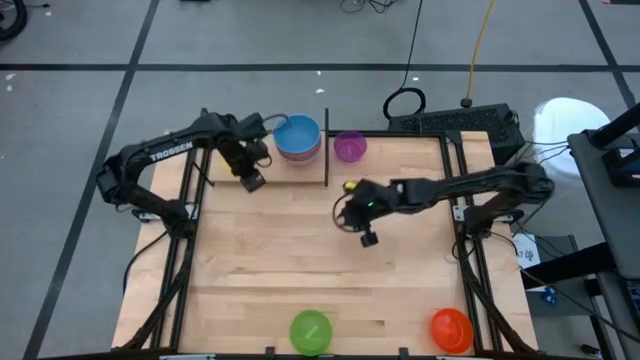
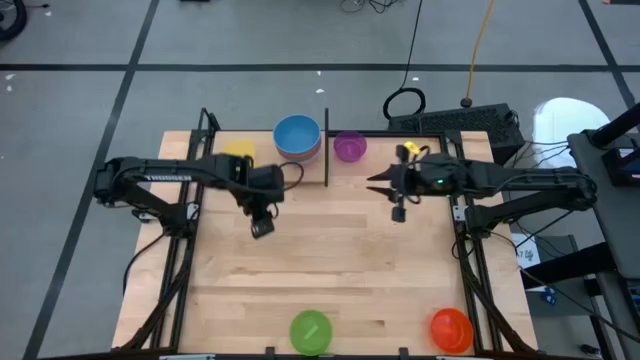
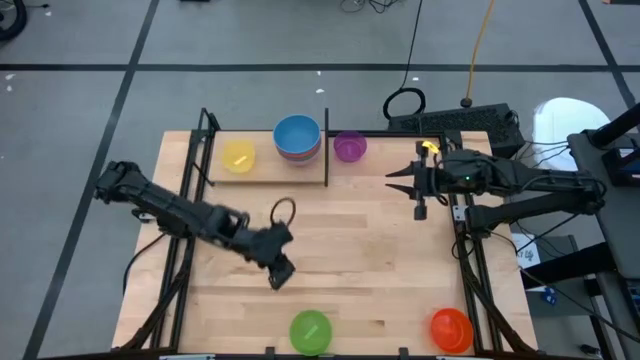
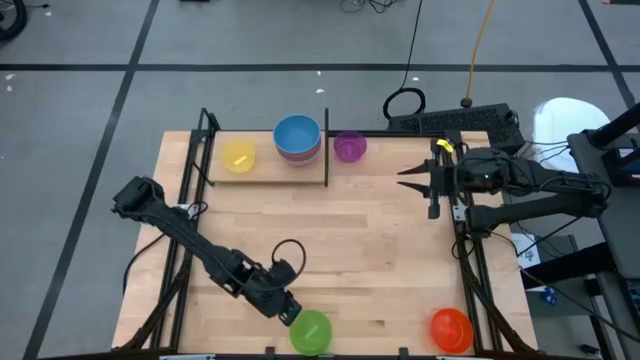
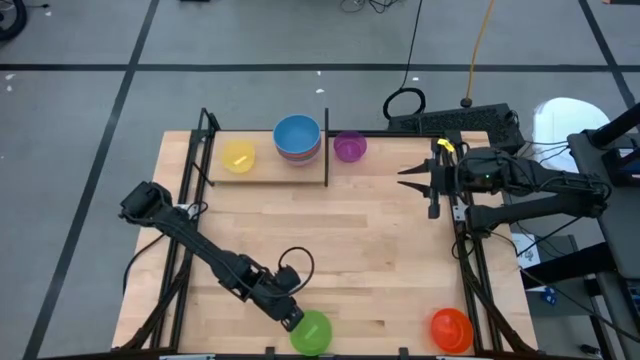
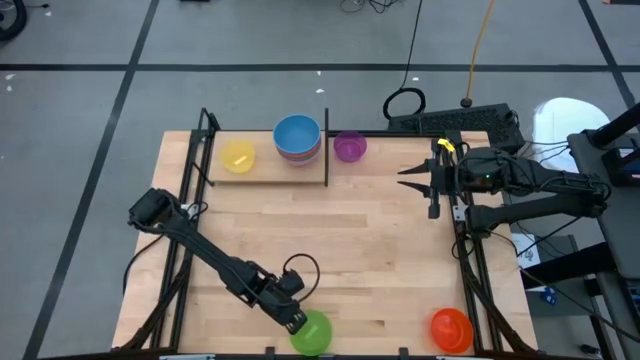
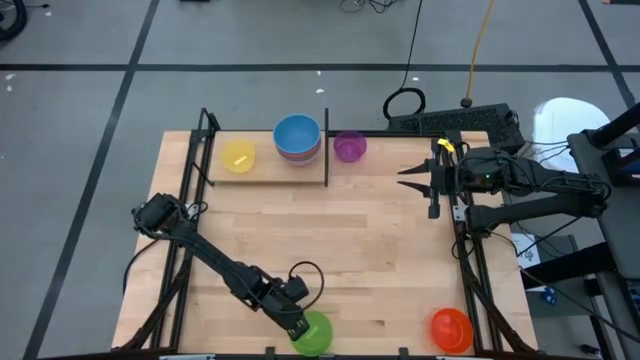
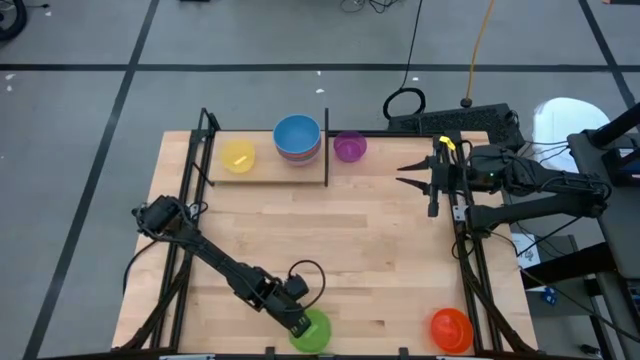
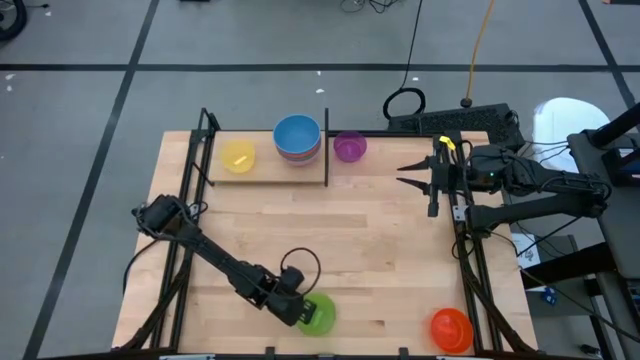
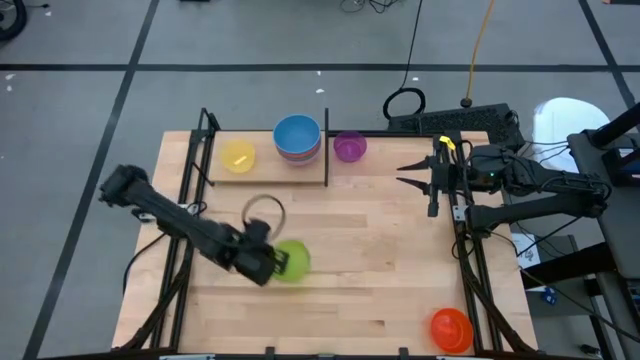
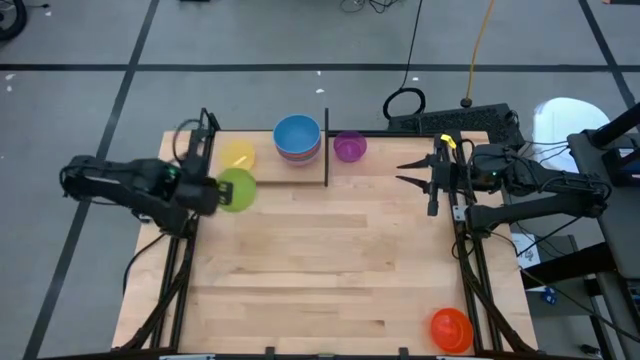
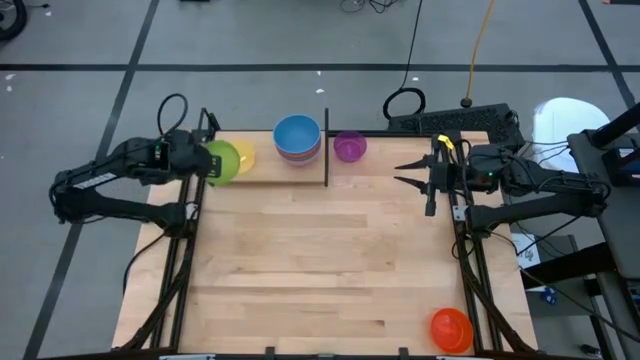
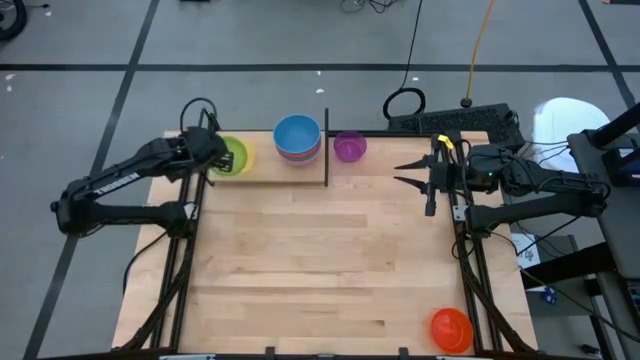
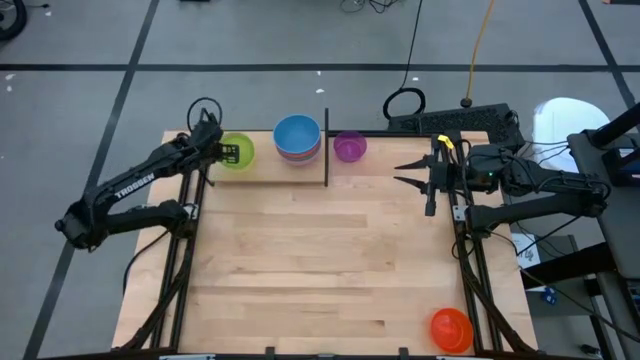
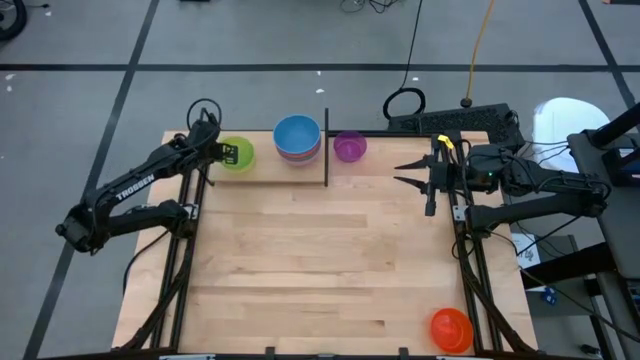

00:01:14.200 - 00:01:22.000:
Task: Place and stack bowls onto a shelf
Stack the small green bowl into the yellow bowl on the shelf

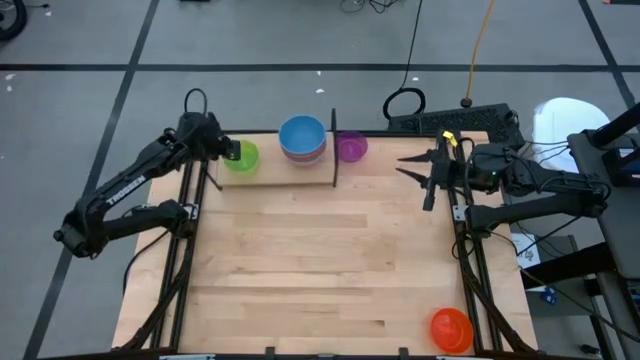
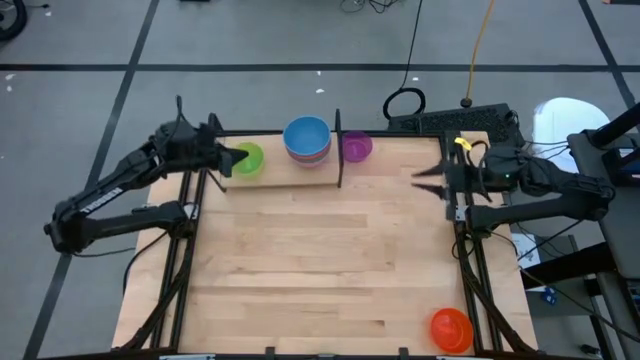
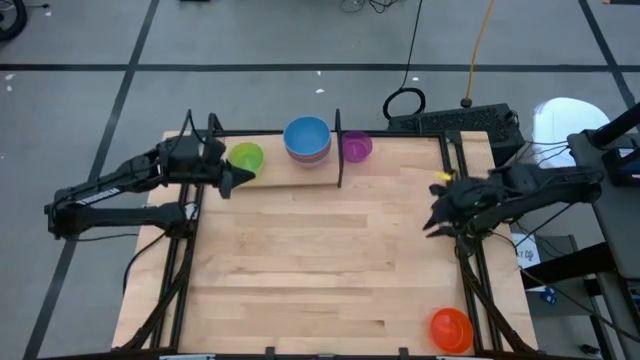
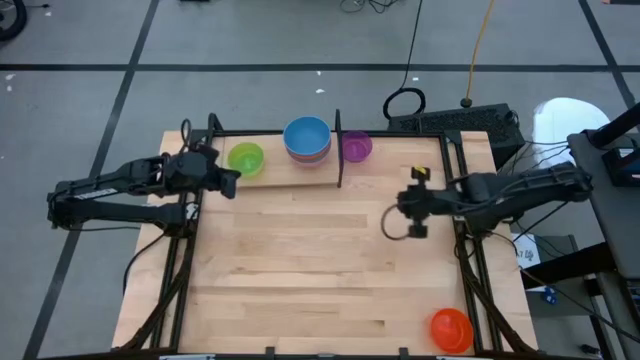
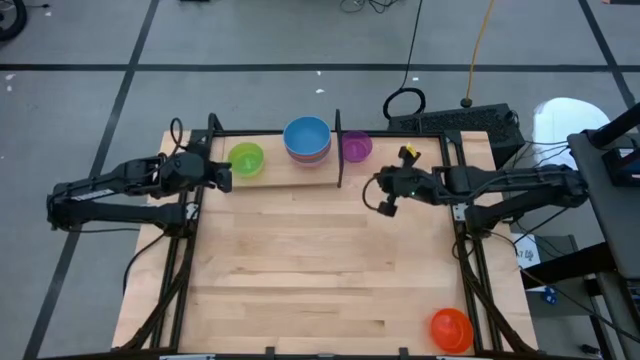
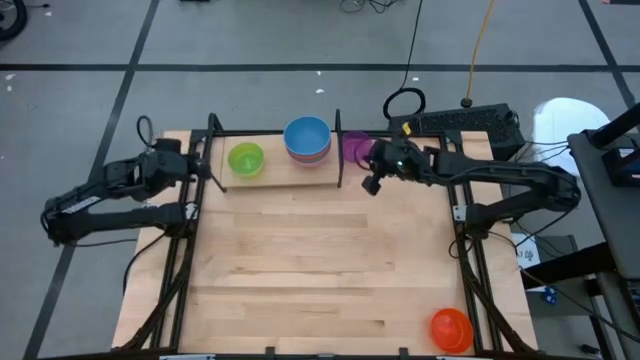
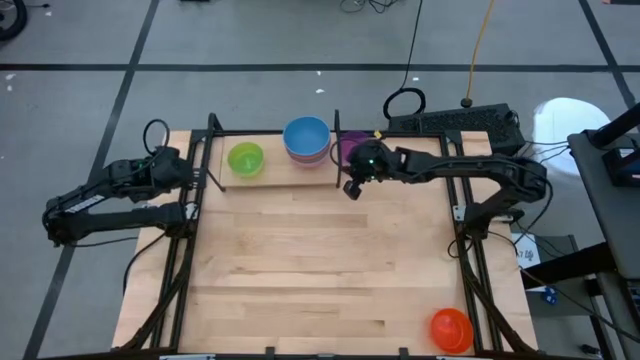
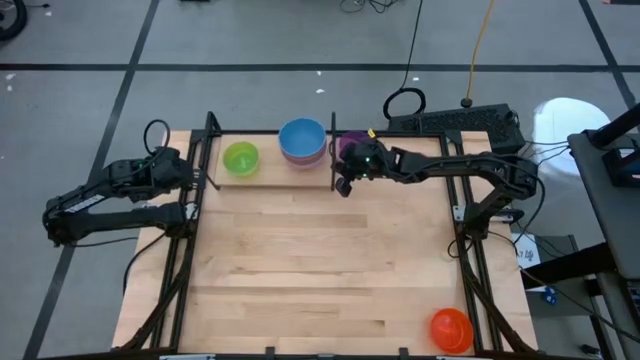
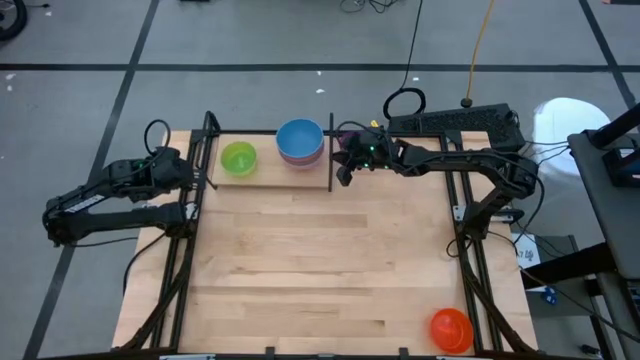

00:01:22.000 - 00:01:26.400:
Adjust the shelf

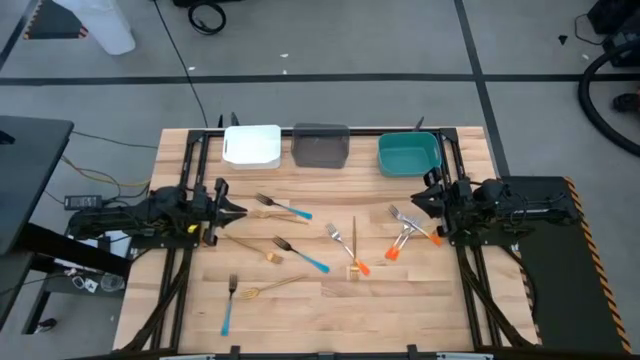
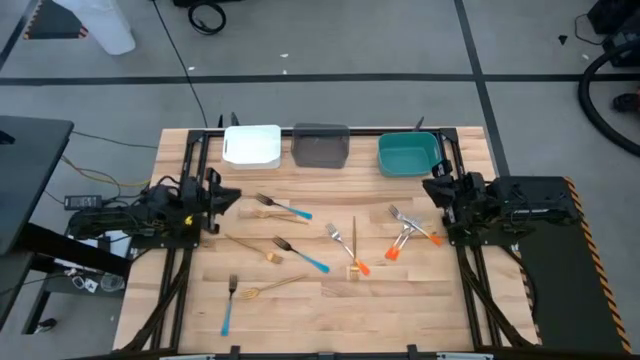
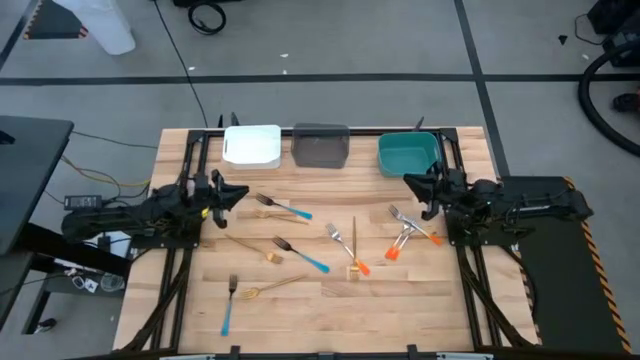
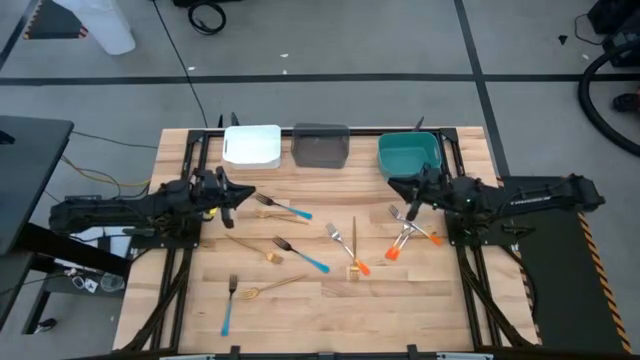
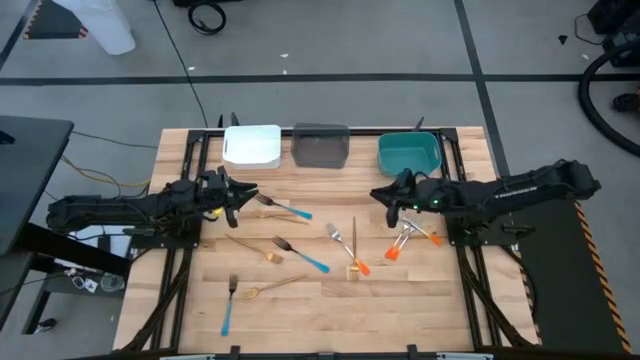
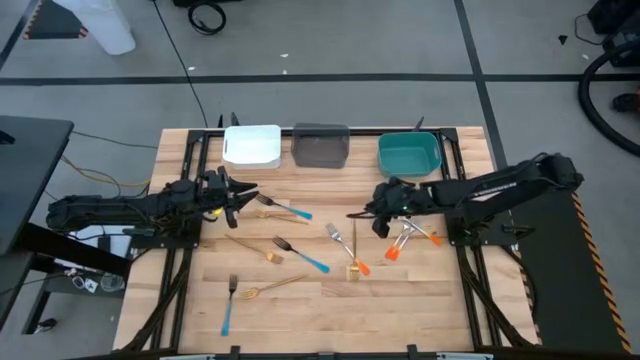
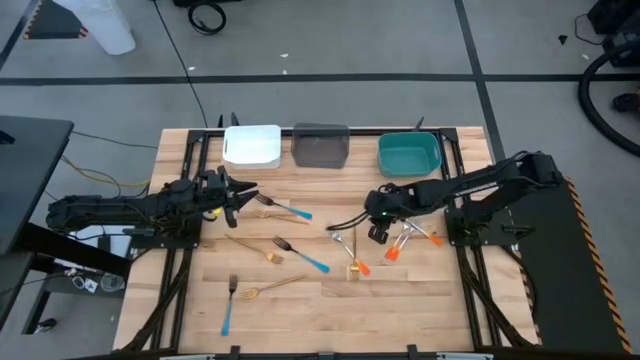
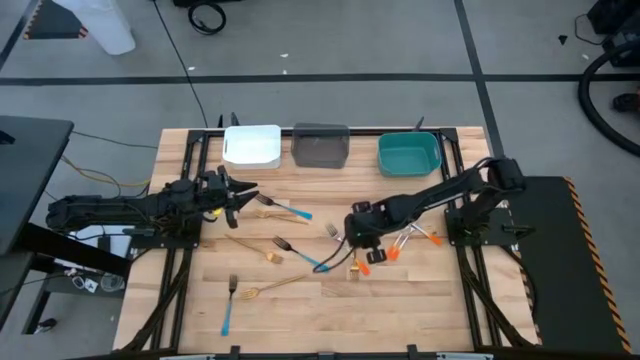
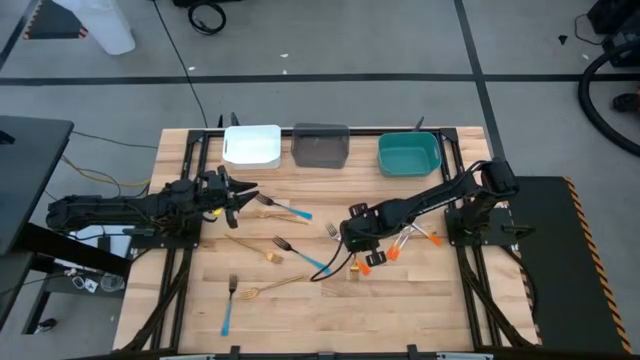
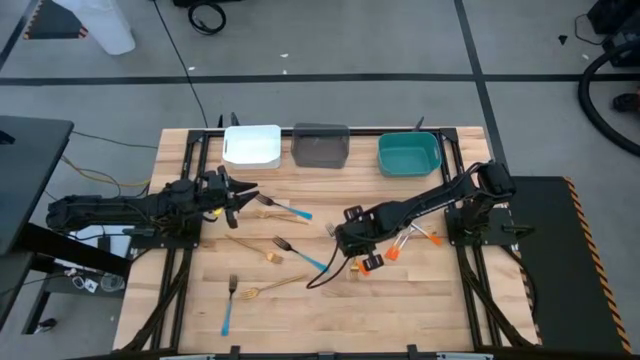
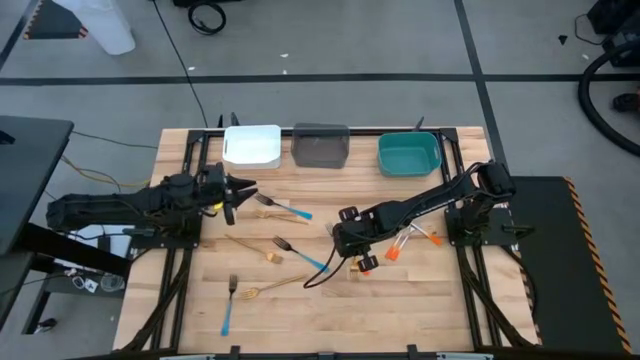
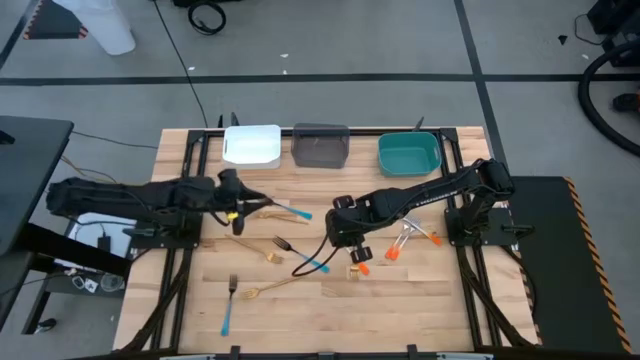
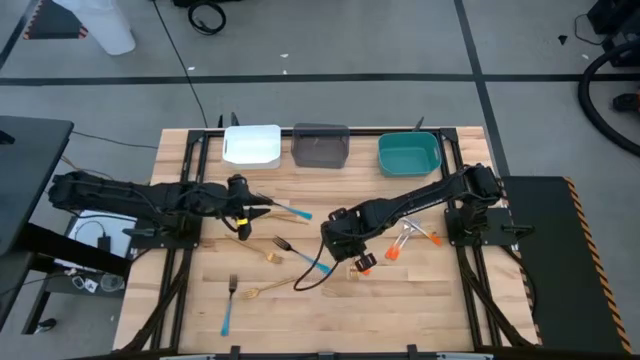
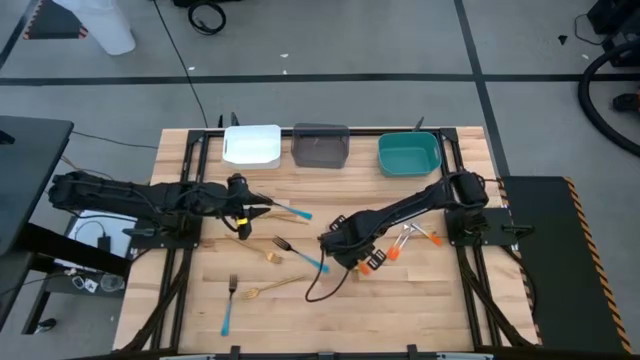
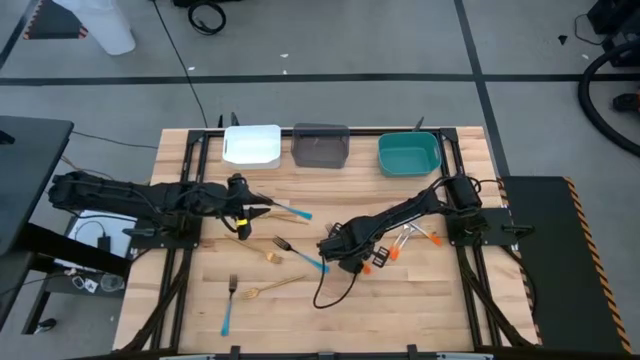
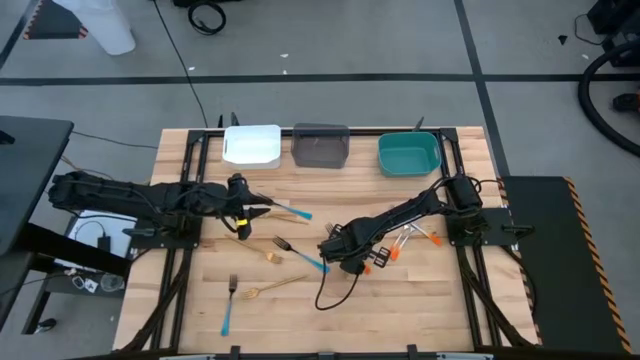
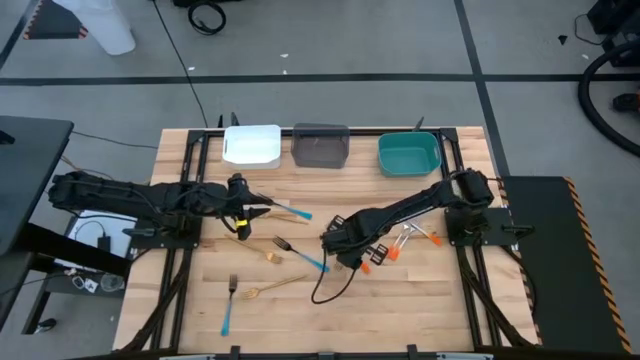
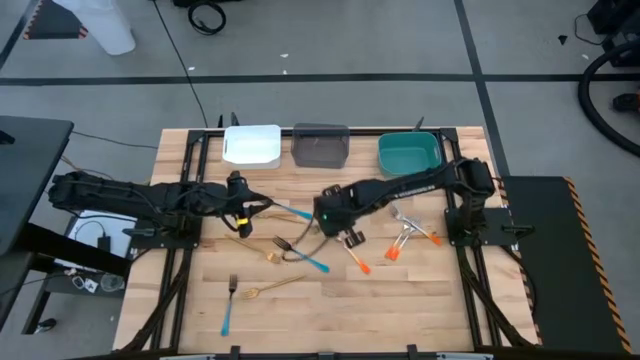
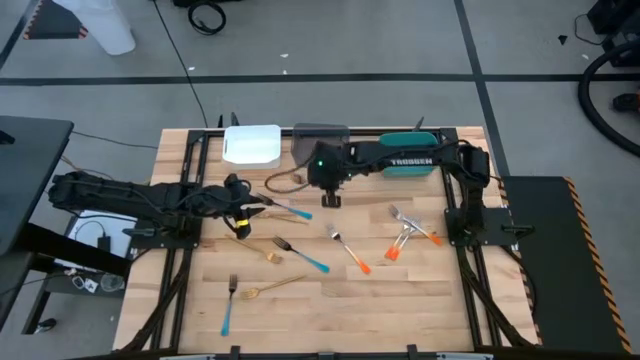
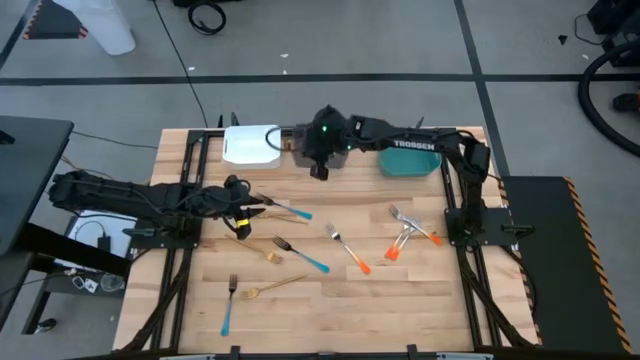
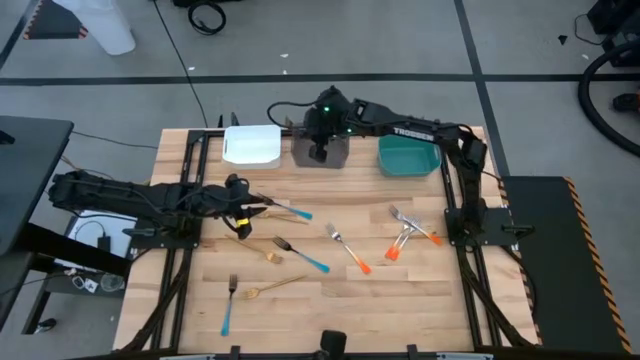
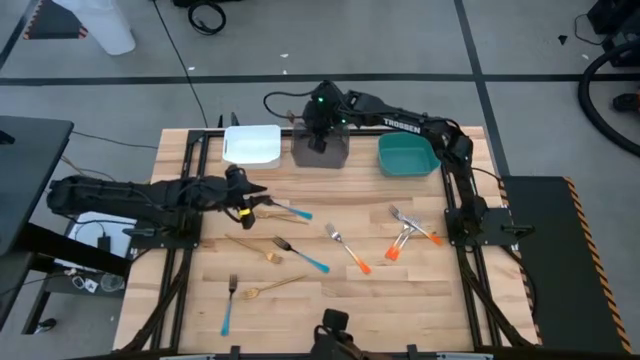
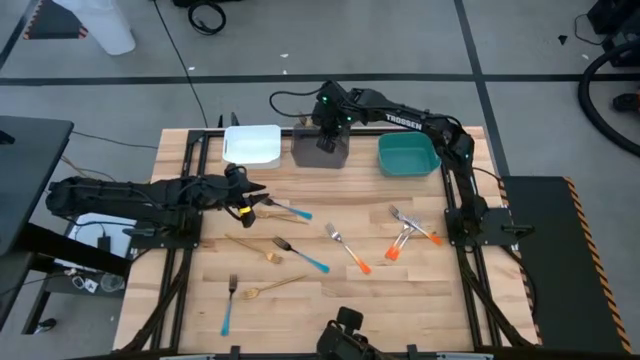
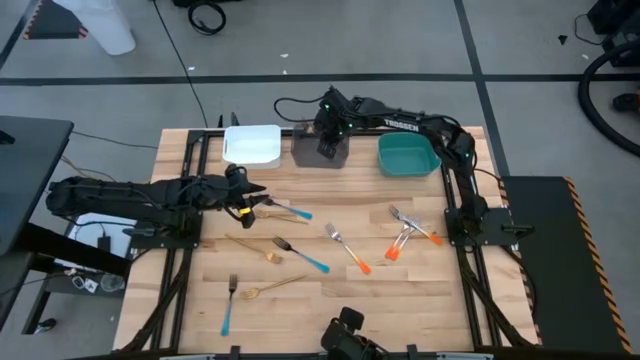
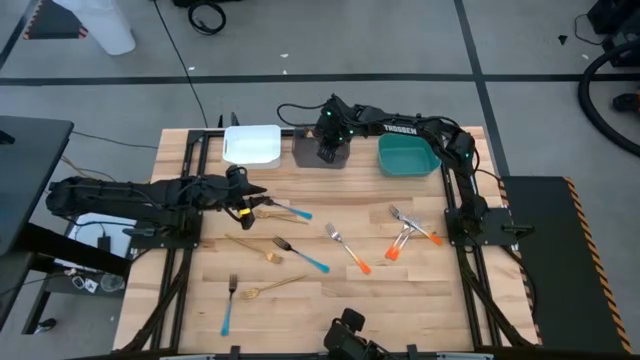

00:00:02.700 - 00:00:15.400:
Task: Sort silverware by color (type)
Put the middle right gold fork into the black bin
